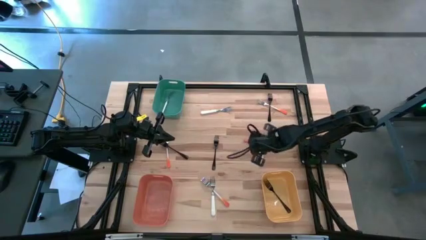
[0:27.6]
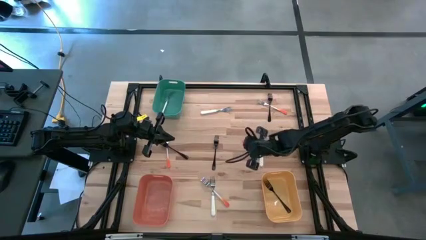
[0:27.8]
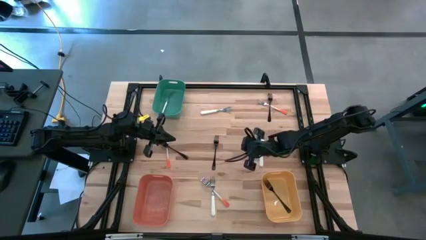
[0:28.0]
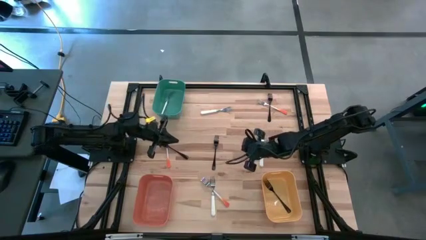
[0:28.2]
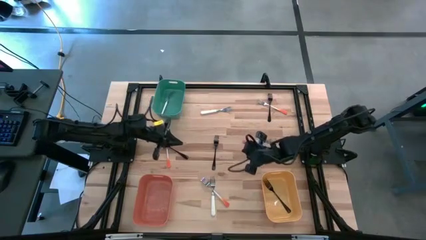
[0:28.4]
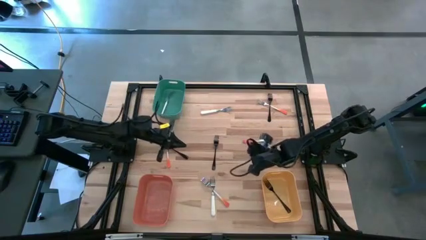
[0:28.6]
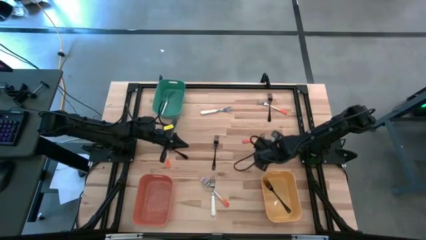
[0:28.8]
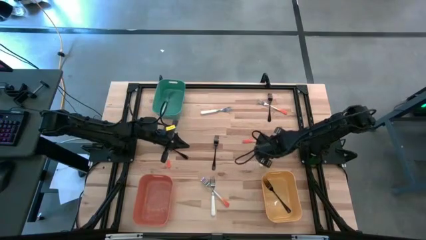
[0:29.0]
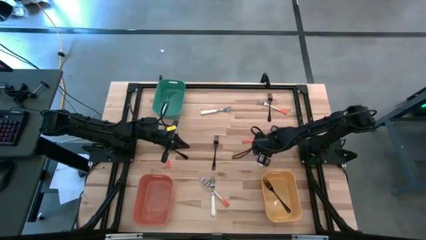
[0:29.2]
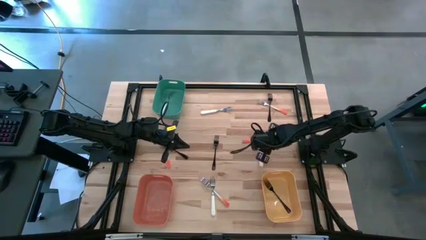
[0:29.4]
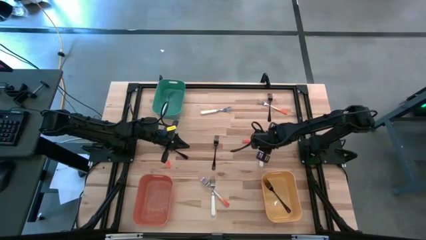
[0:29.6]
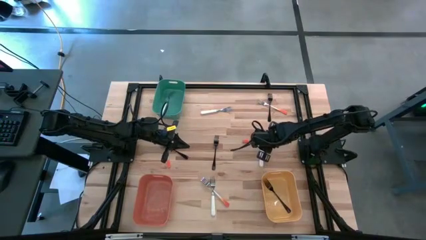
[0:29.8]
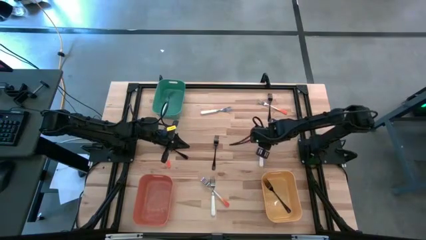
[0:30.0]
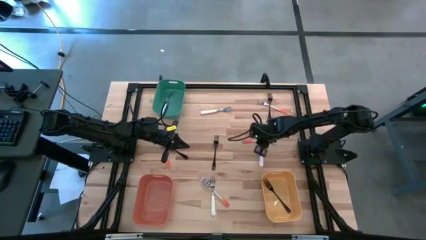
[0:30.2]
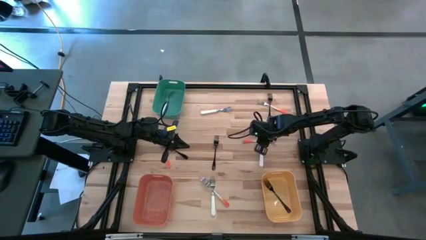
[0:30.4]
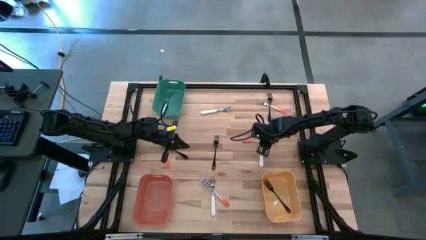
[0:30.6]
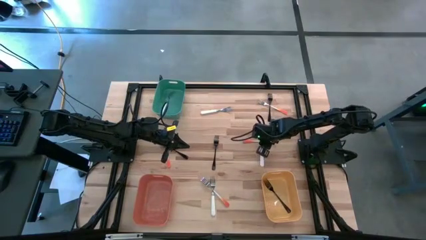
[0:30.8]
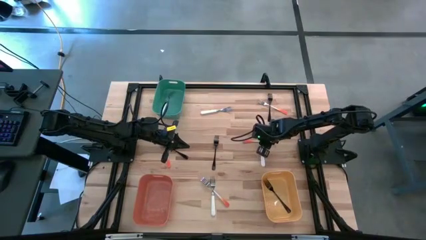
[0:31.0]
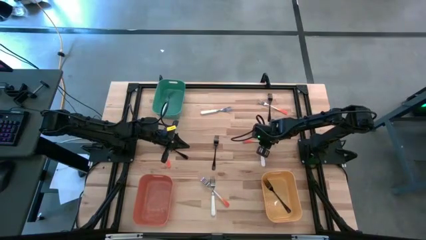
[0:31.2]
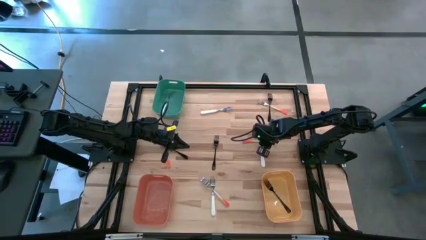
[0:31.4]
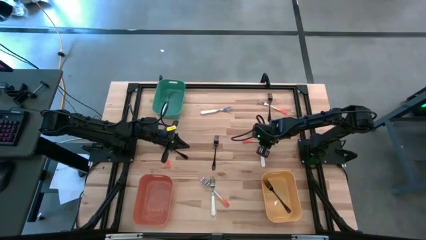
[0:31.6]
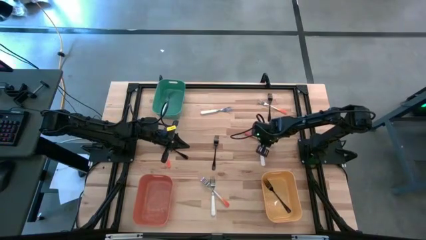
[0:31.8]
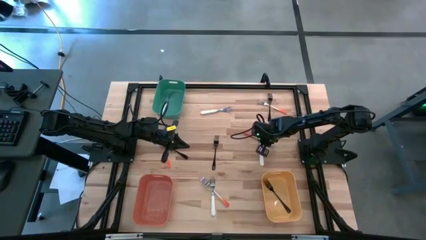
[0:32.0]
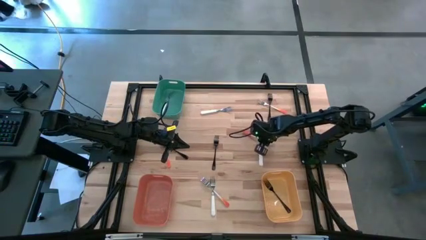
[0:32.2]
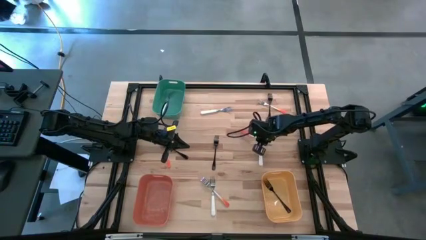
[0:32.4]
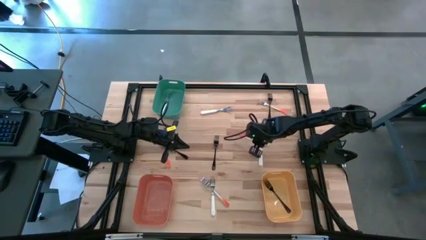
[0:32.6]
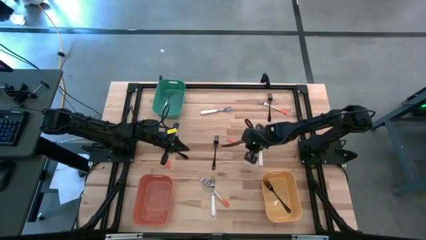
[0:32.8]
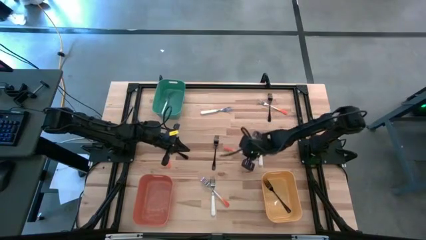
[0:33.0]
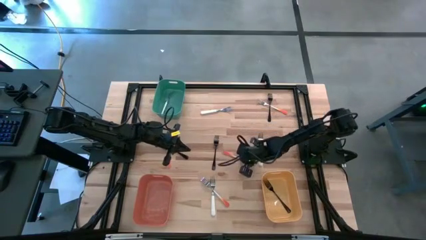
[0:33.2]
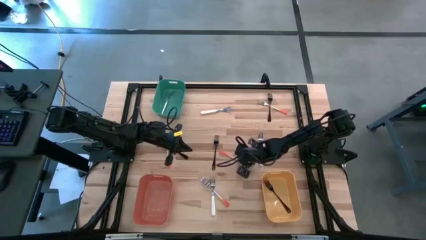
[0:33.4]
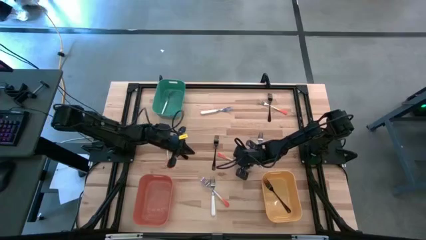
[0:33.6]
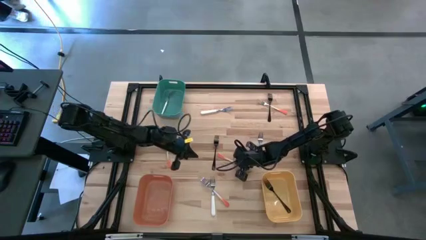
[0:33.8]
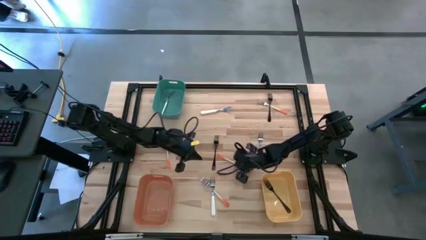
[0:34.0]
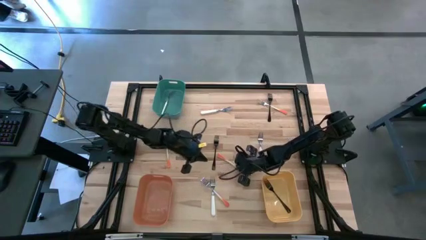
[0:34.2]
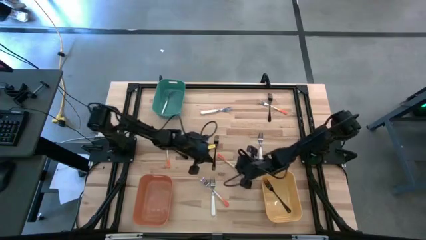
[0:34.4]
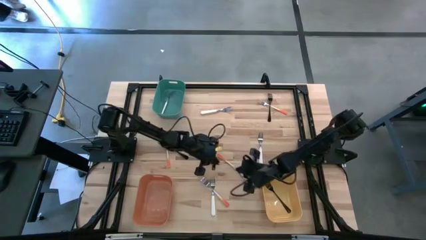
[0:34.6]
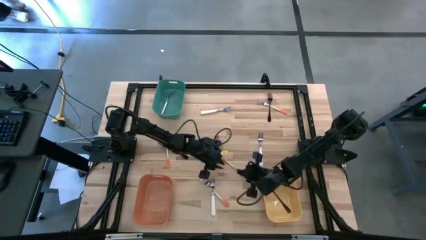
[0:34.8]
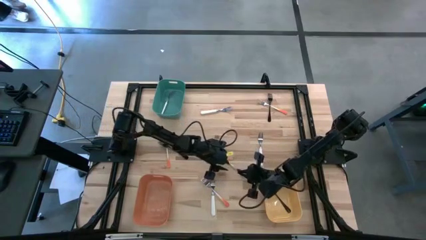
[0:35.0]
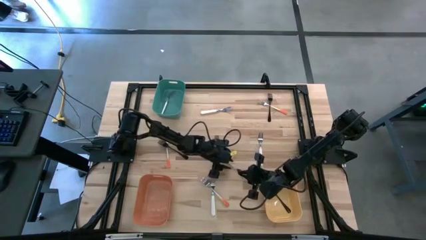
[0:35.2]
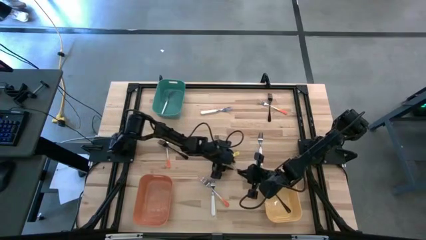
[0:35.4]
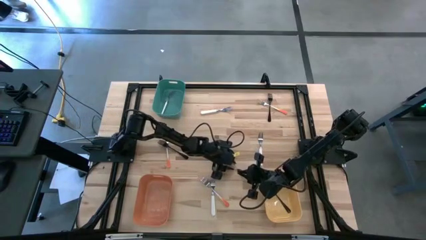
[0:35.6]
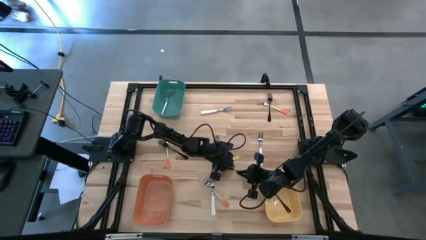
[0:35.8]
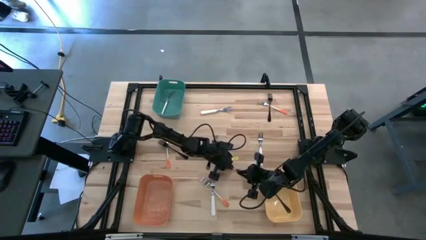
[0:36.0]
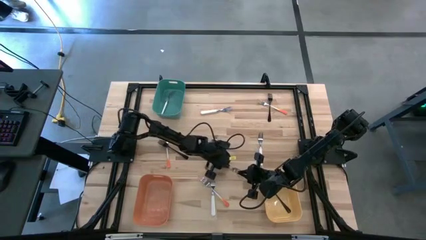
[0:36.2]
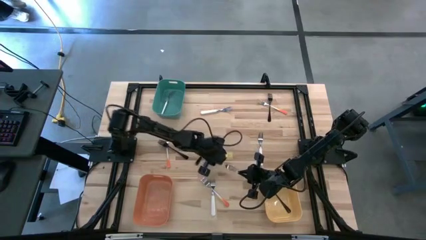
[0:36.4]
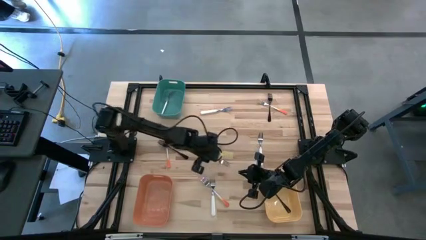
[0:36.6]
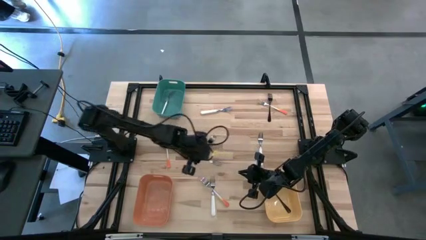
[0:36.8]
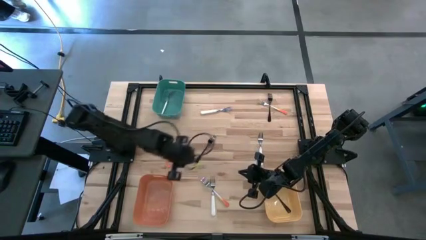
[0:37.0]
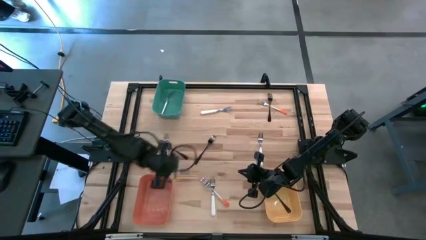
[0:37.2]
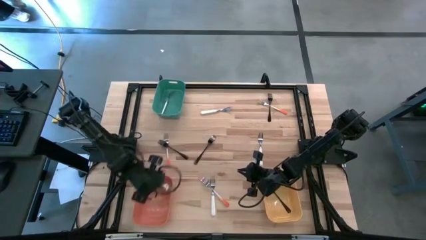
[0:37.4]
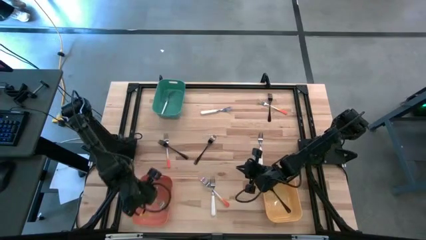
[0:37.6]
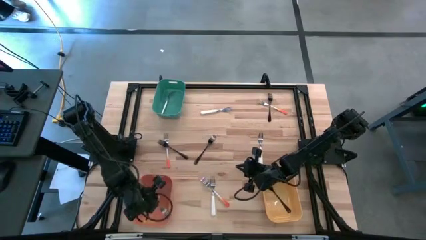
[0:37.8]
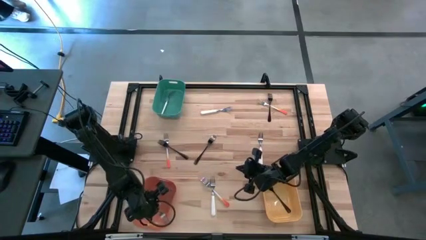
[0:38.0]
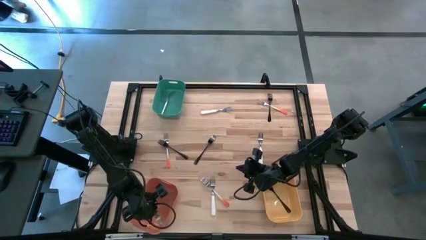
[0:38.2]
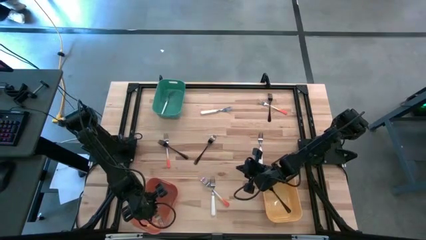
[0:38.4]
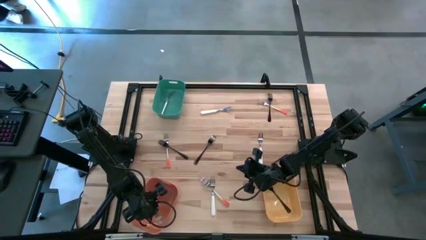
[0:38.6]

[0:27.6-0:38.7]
Task: Sort silverware by color (type)
Put the orange fork into the orange bin
